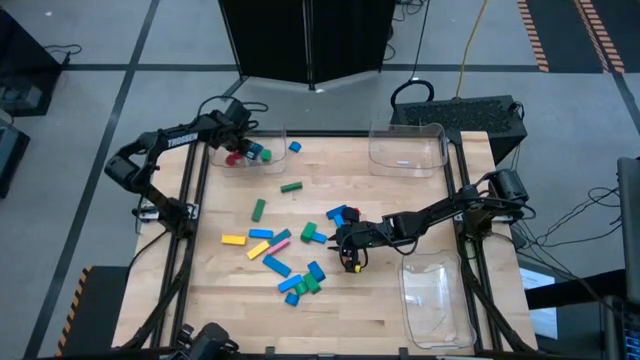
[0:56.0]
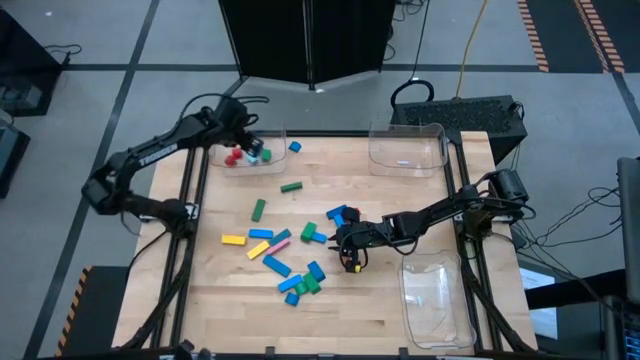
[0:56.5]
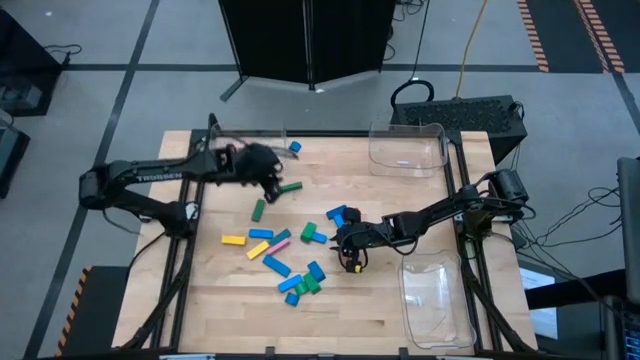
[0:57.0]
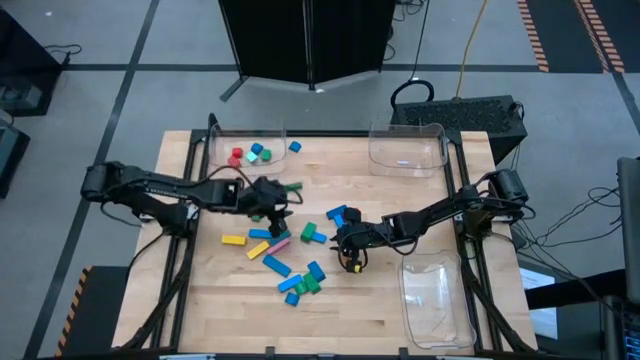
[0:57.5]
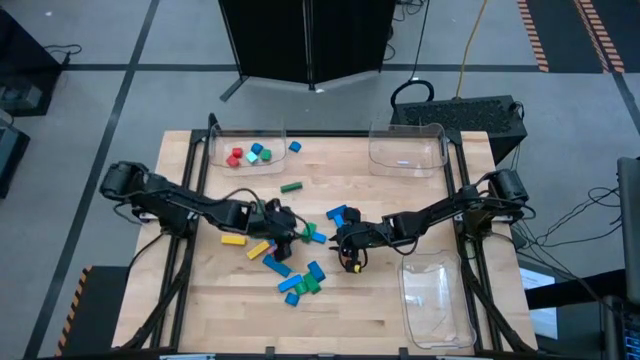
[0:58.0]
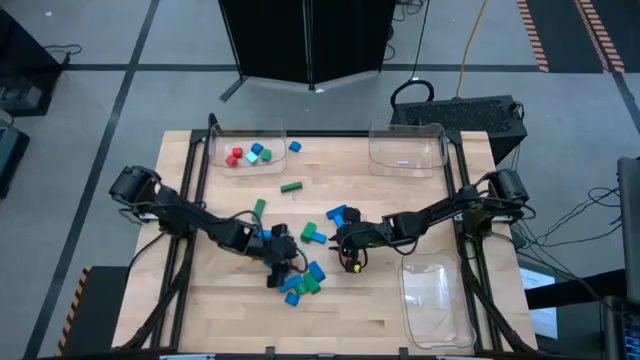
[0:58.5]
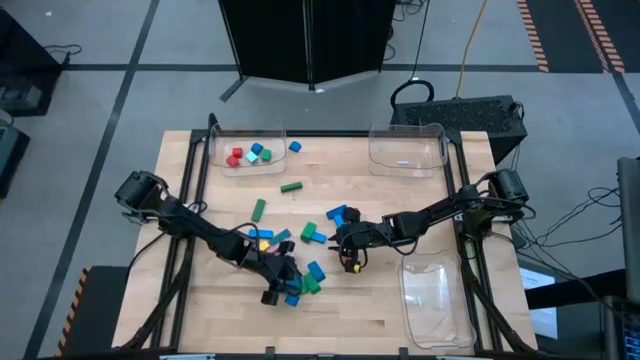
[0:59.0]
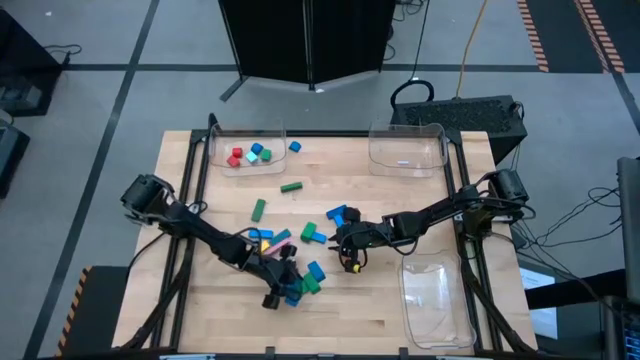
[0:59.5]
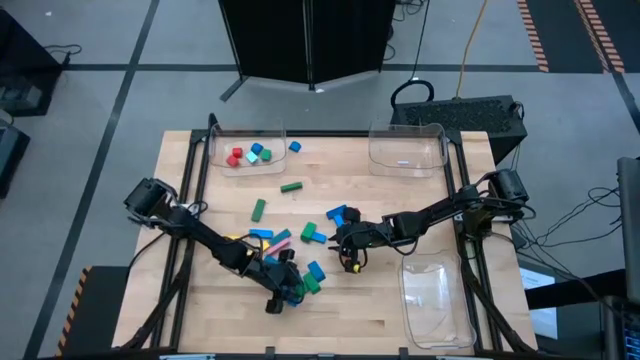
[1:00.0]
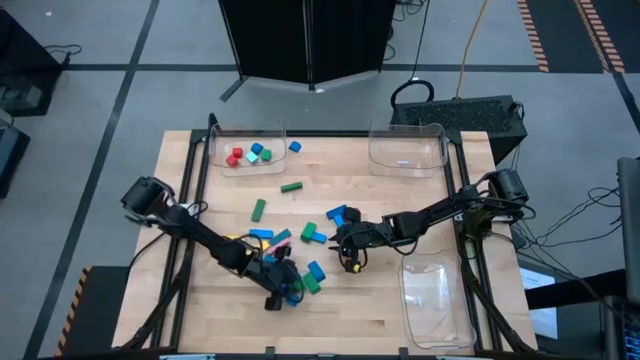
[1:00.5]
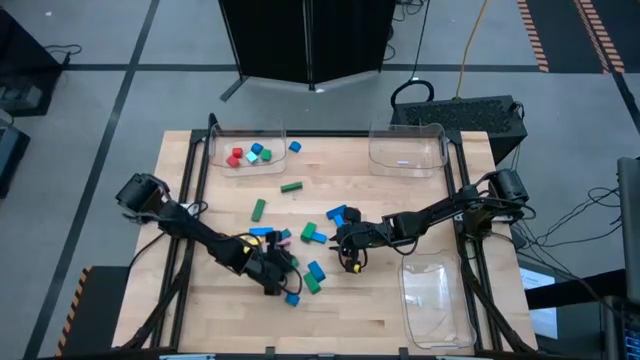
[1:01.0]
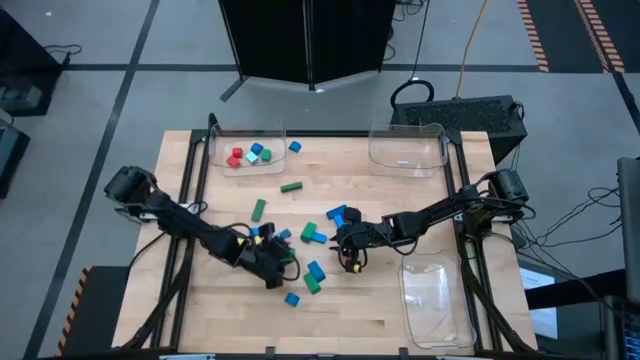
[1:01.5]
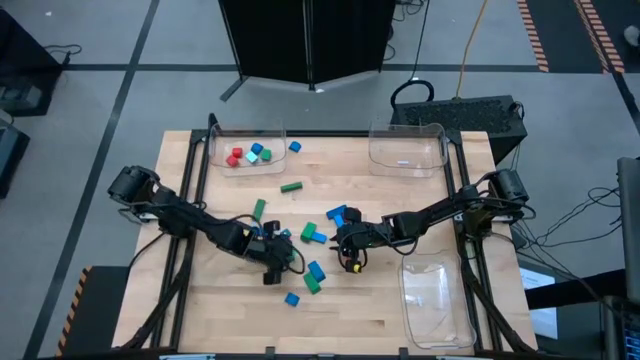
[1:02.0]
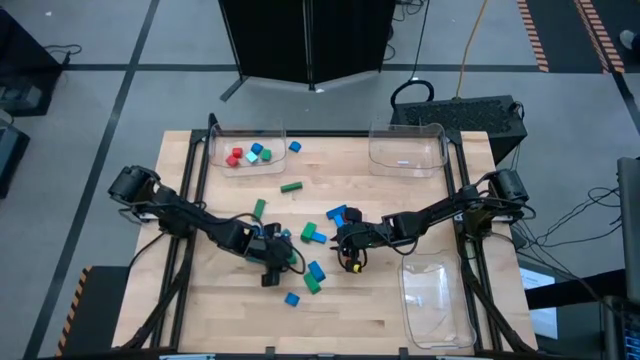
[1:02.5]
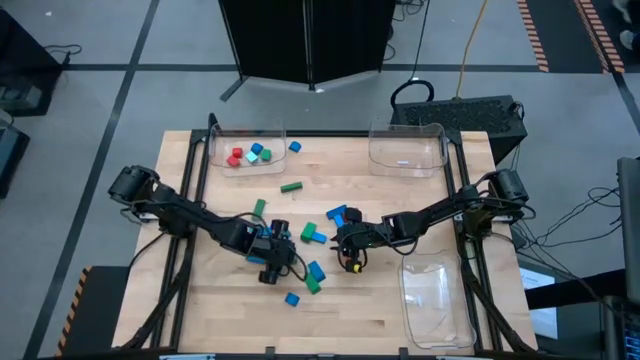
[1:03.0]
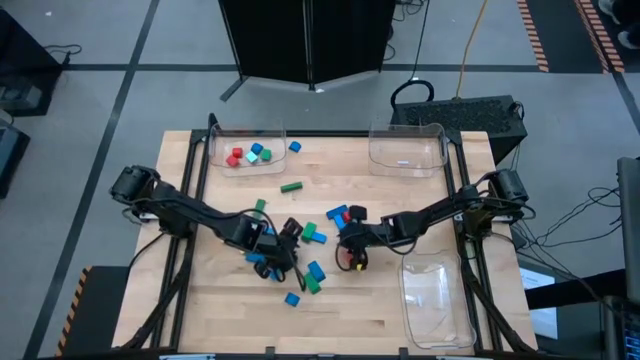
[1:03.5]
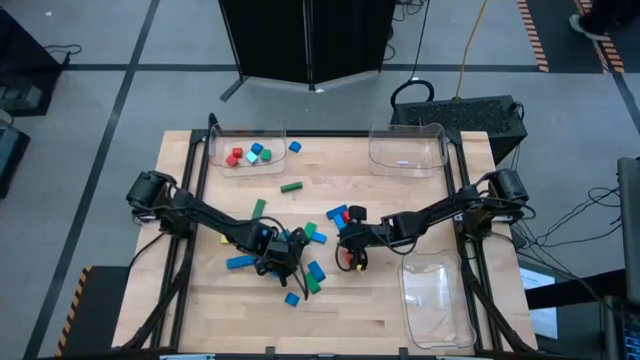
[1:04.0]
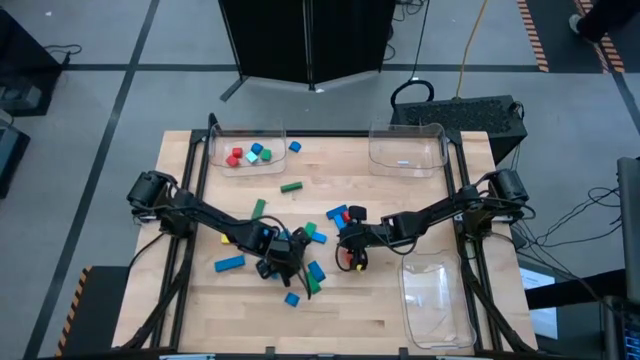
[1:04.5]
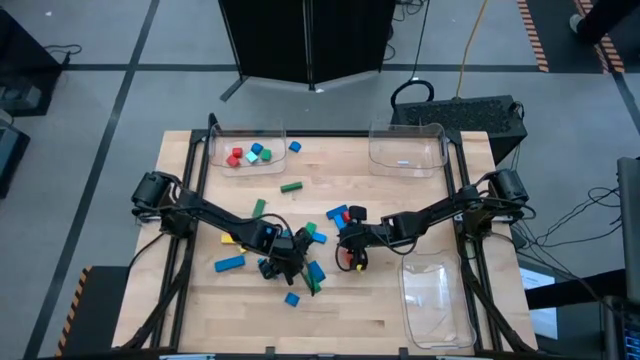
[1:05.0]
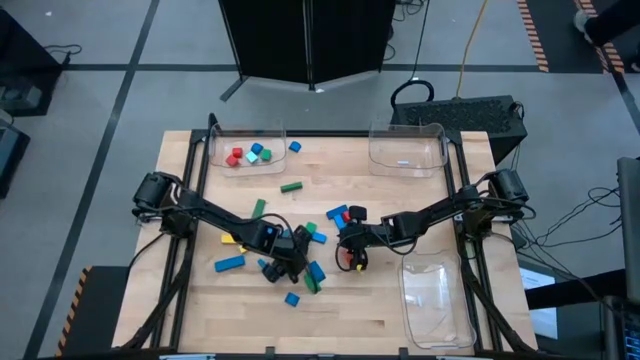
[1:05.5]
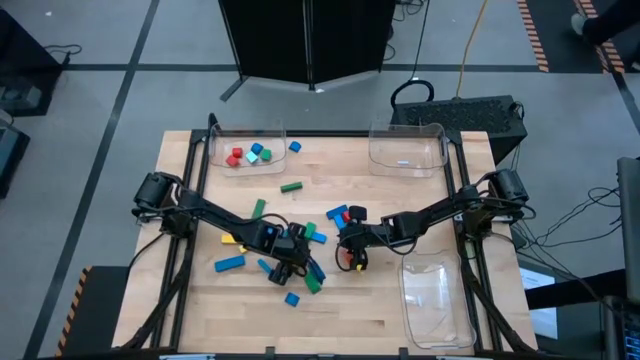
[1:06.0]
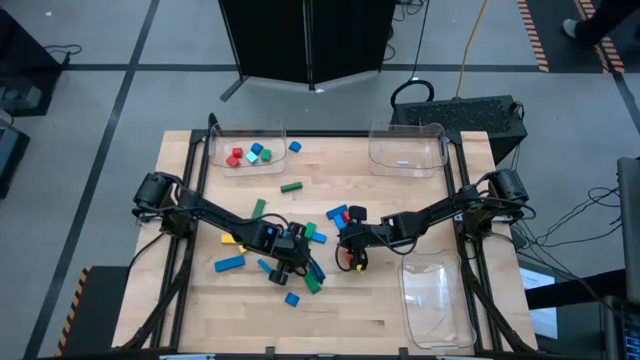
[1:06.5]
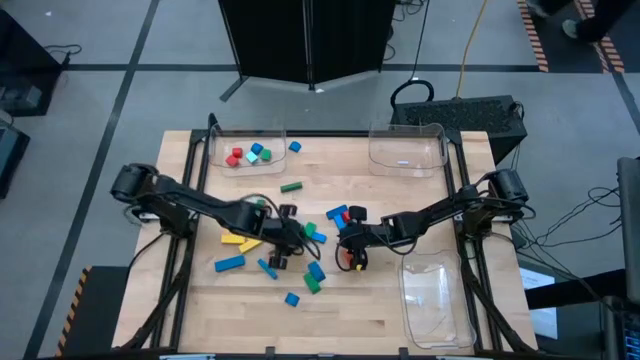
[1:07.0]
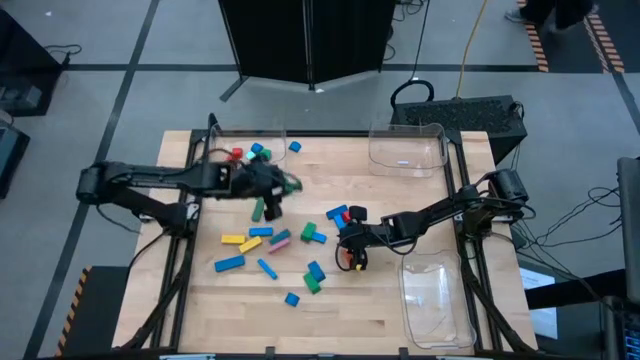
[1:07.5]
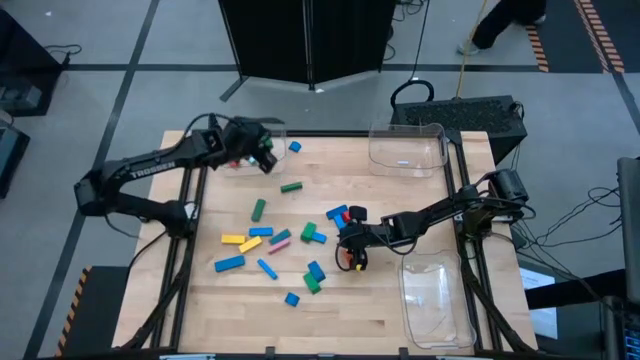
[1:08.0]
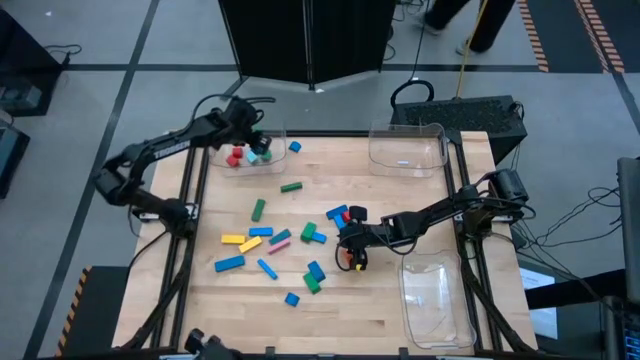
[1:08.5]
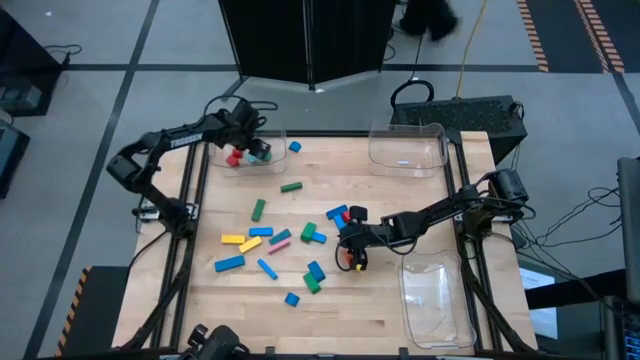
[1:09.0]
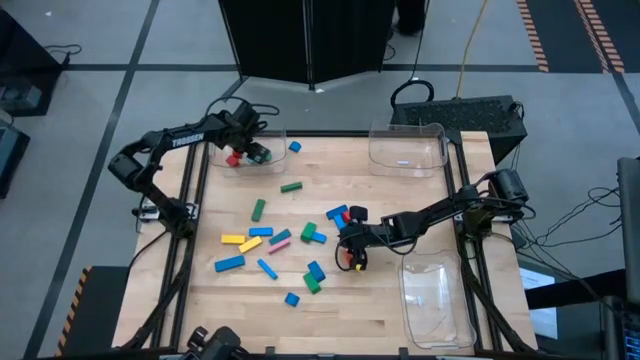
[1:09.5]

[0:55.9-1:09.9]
Task: Sort blocks by size
Put the green half-circle block into the top left transparent bin

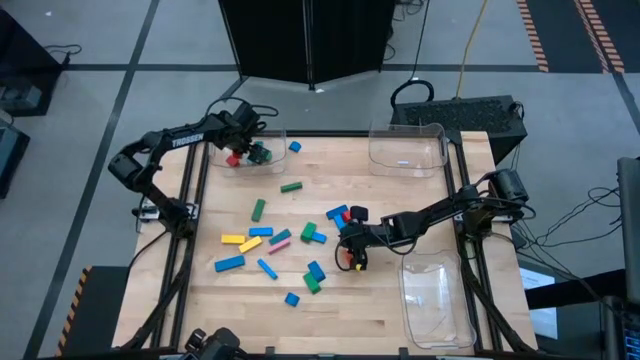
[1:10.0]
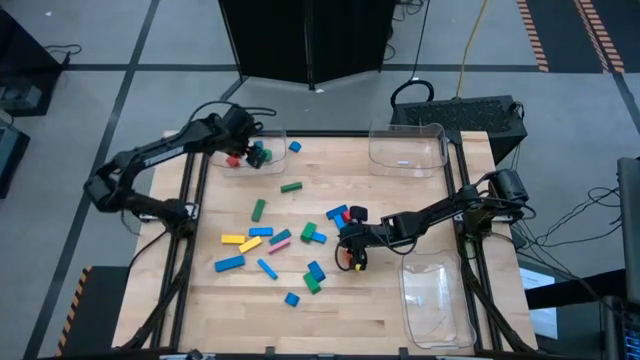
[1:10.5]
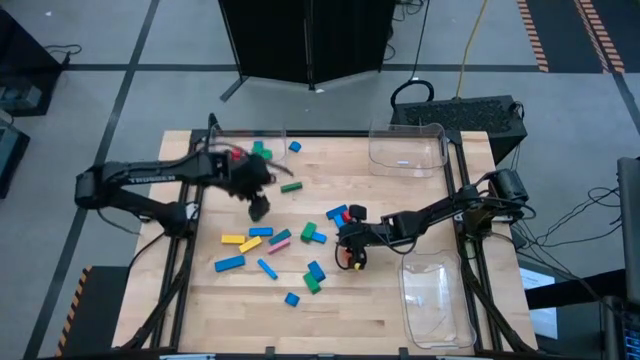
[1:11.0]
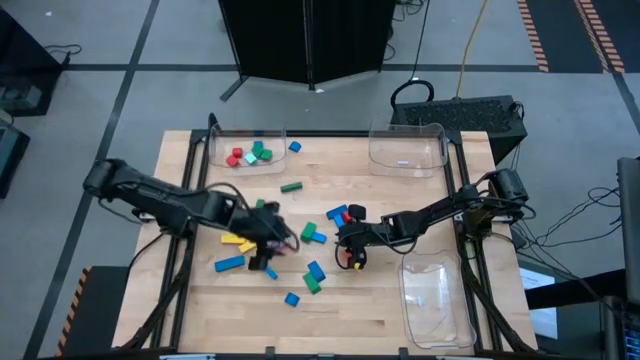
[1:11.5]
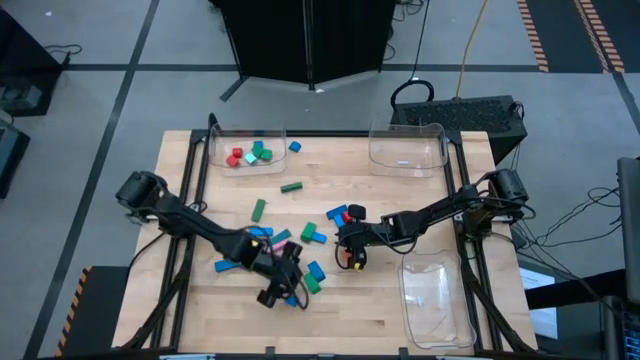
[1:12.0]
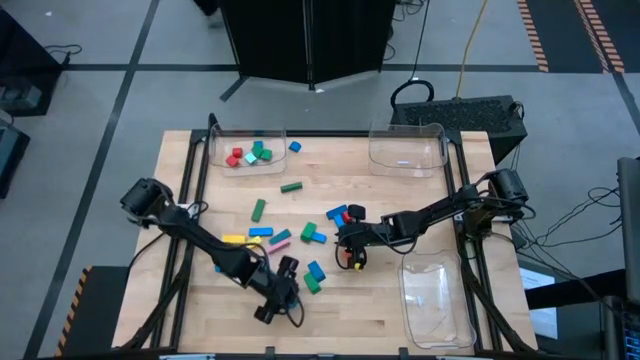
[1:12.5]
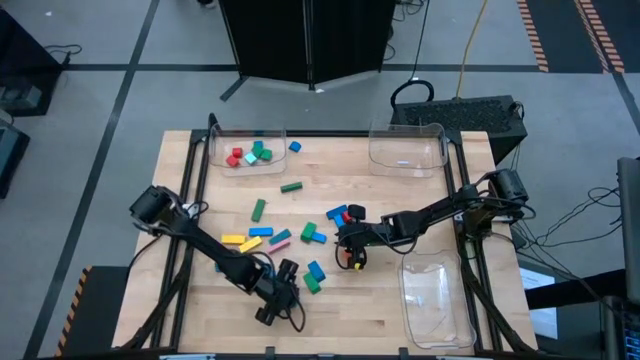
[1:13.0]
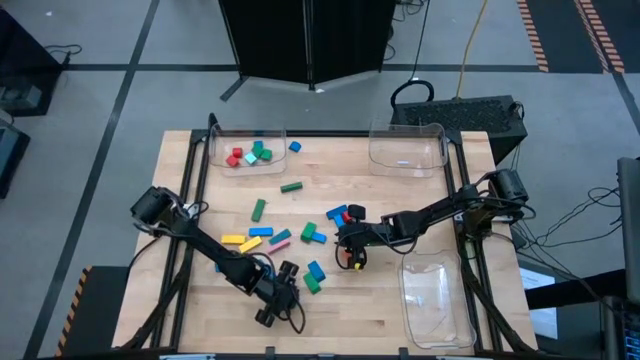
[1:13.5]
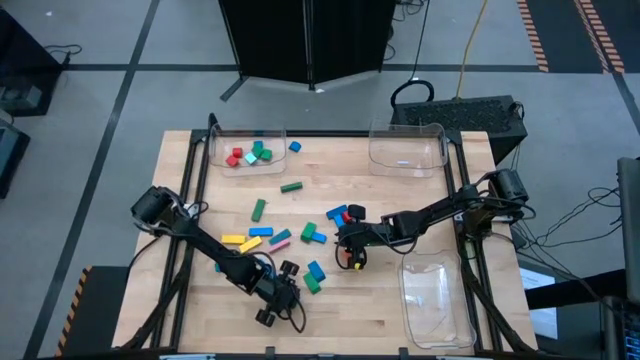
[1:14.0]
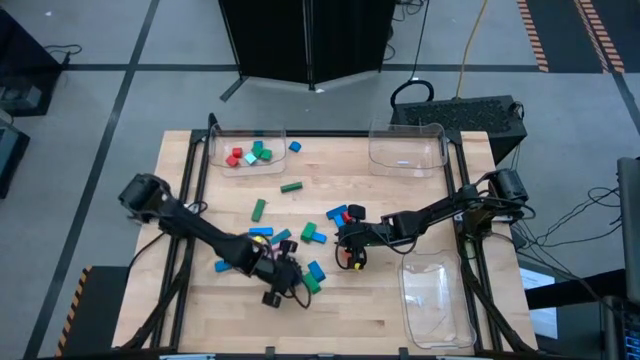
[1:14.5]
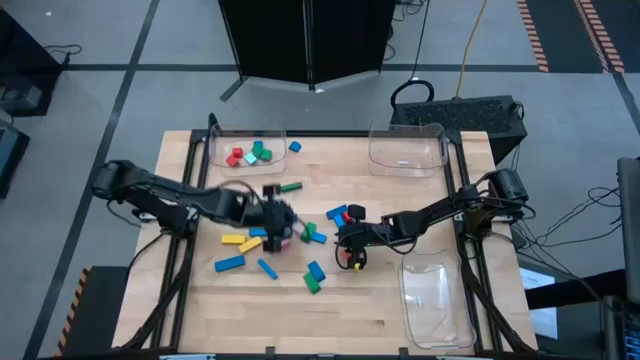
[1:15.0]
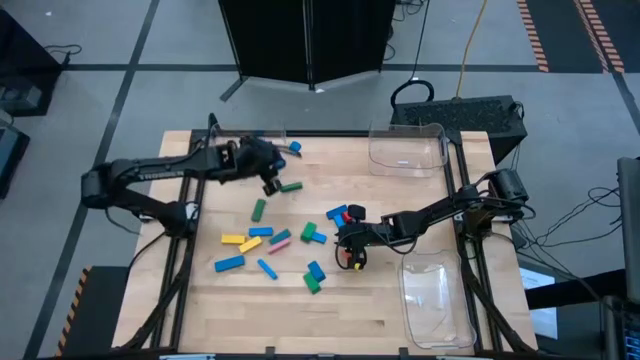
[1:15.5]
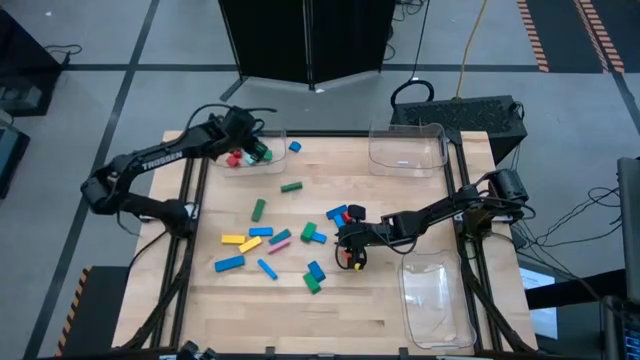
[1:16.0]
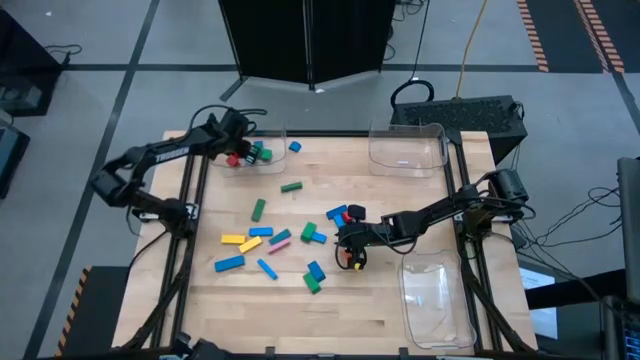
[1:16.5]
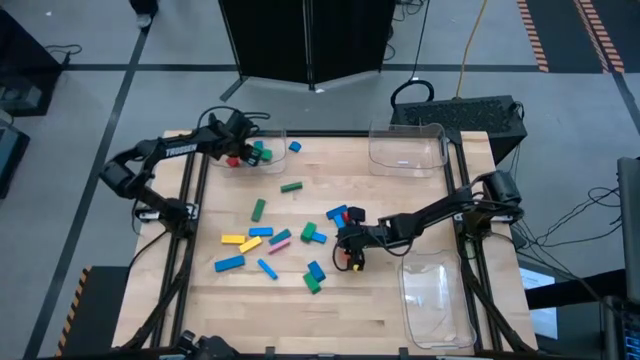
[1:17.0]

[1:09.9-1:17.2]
Put the blue half-circle block into the top left transparent bin
